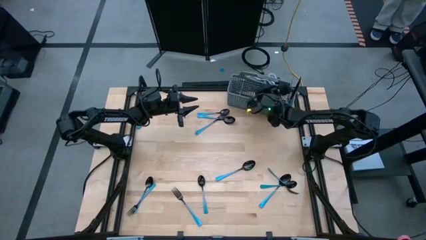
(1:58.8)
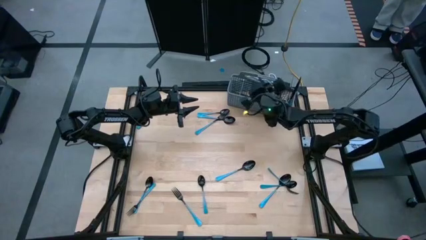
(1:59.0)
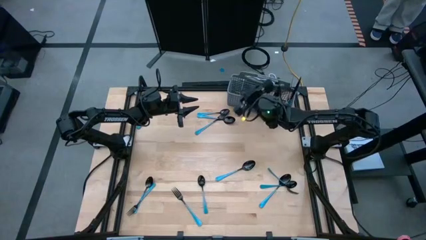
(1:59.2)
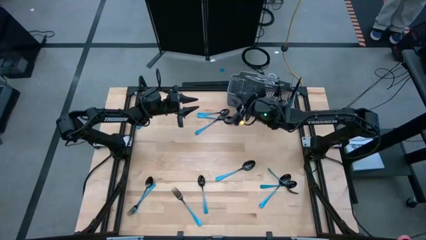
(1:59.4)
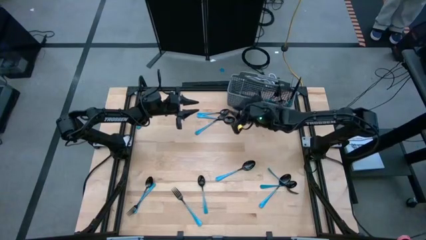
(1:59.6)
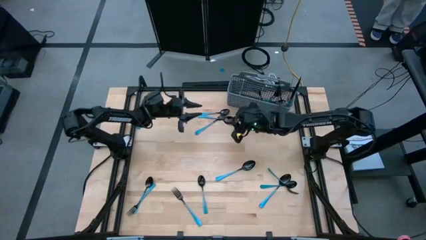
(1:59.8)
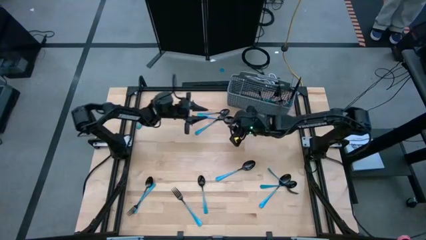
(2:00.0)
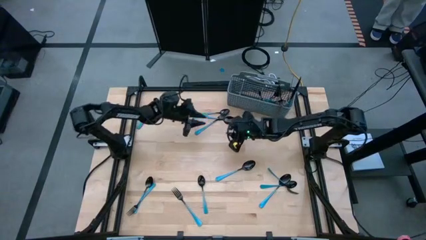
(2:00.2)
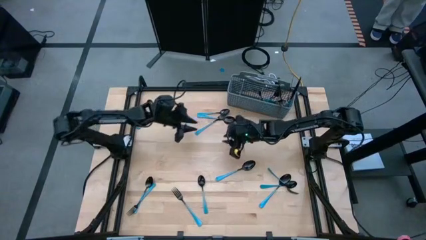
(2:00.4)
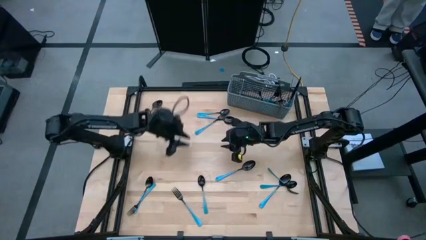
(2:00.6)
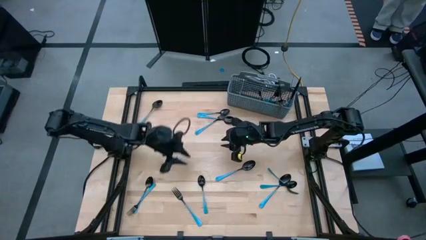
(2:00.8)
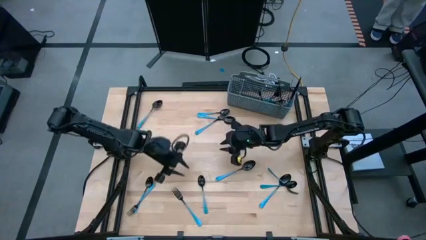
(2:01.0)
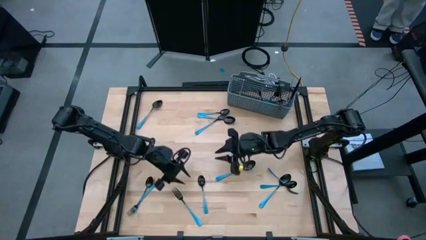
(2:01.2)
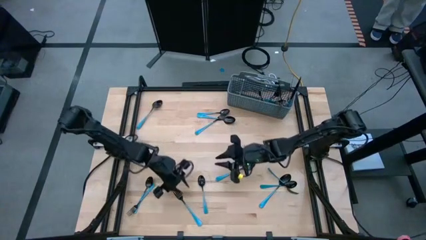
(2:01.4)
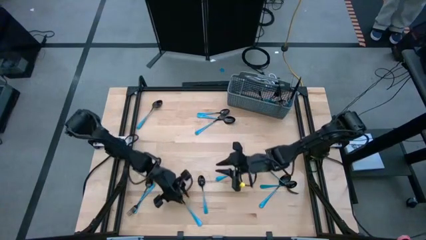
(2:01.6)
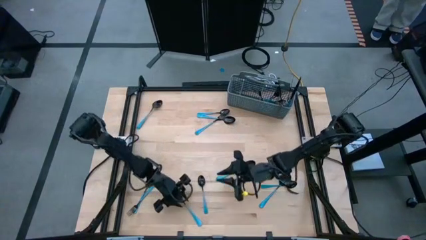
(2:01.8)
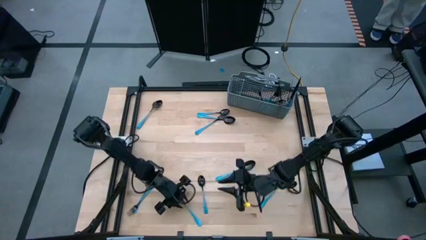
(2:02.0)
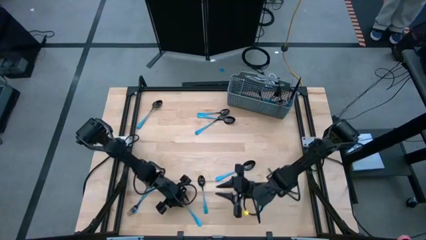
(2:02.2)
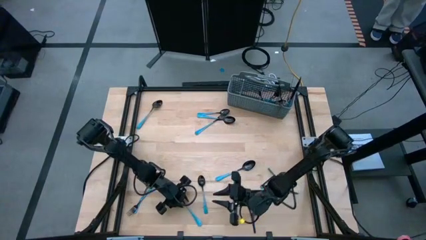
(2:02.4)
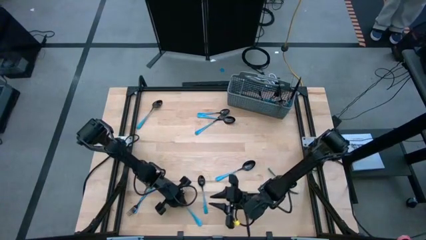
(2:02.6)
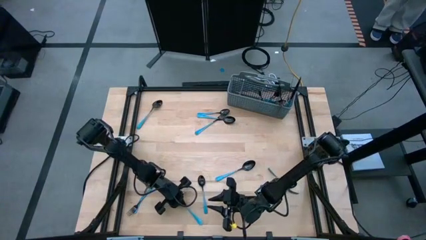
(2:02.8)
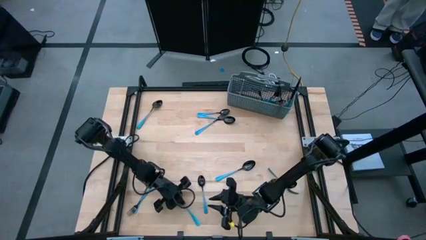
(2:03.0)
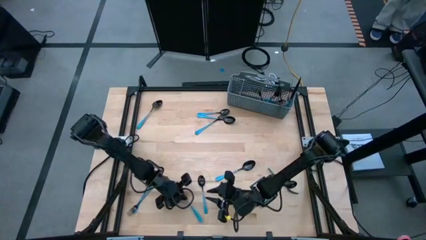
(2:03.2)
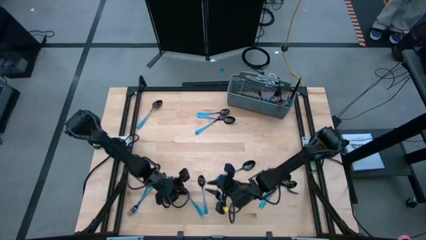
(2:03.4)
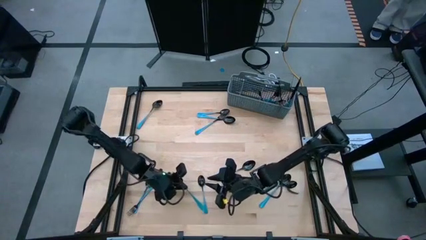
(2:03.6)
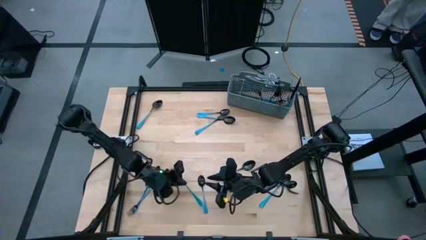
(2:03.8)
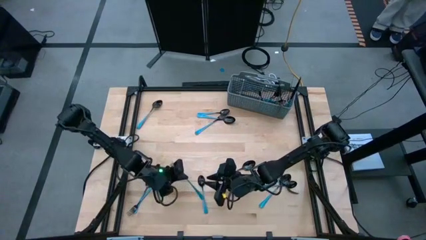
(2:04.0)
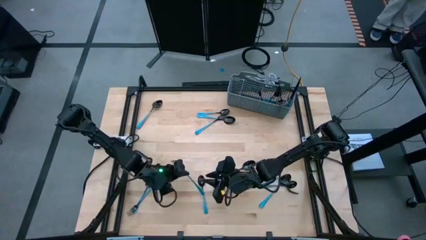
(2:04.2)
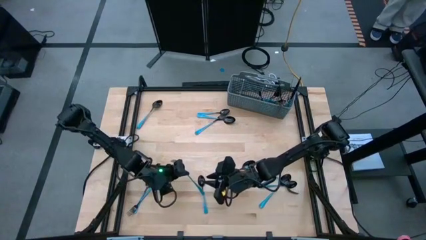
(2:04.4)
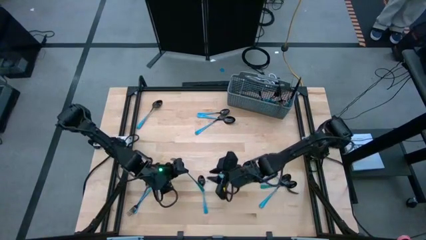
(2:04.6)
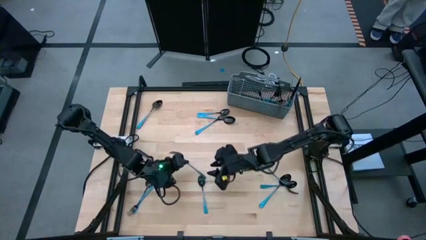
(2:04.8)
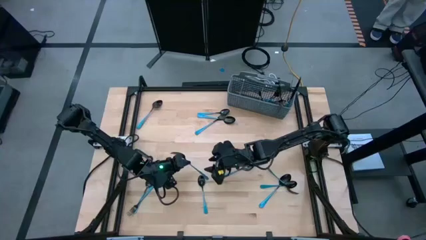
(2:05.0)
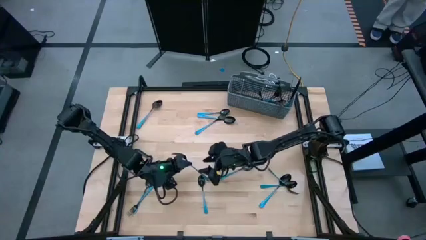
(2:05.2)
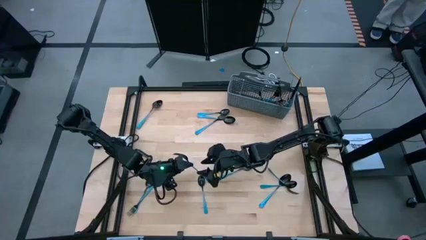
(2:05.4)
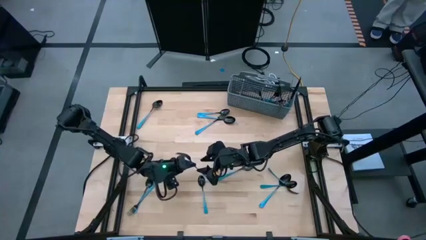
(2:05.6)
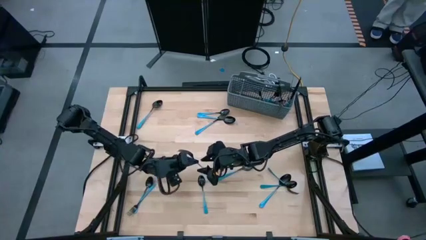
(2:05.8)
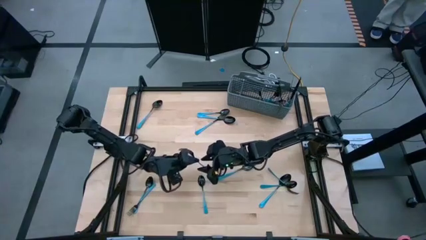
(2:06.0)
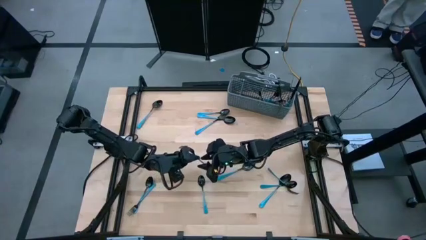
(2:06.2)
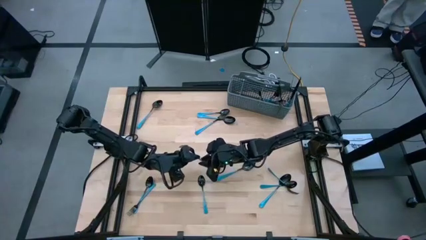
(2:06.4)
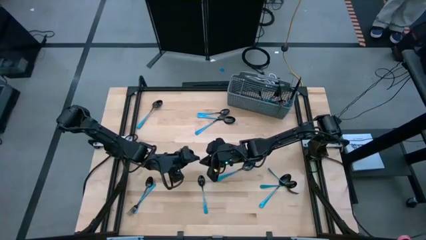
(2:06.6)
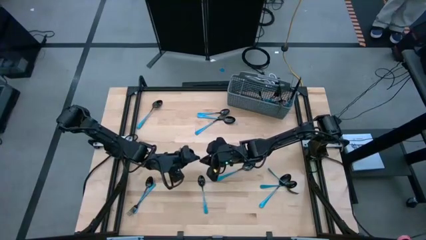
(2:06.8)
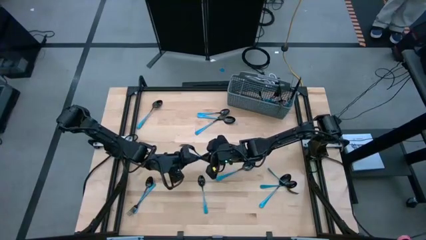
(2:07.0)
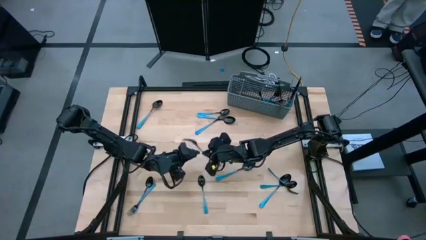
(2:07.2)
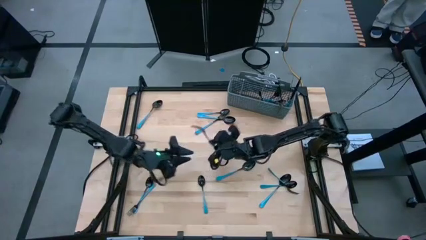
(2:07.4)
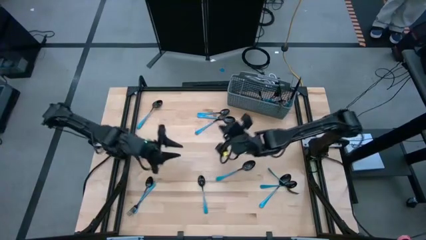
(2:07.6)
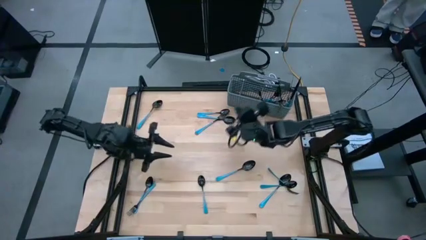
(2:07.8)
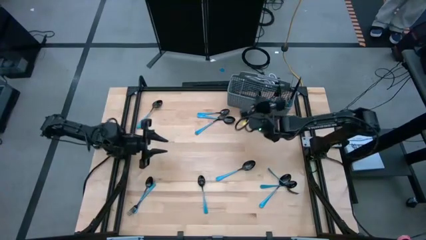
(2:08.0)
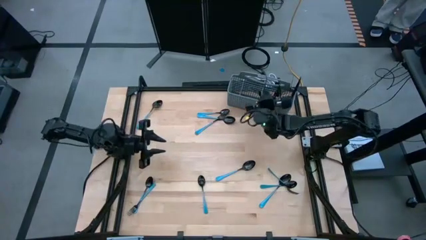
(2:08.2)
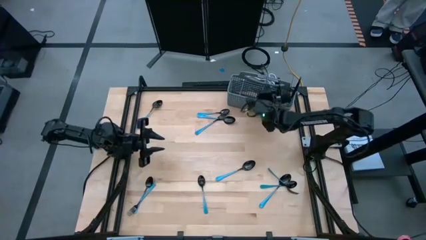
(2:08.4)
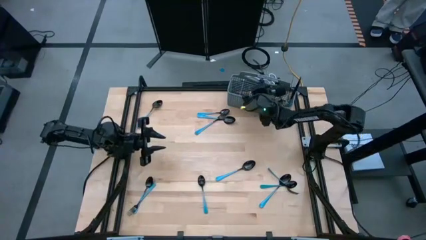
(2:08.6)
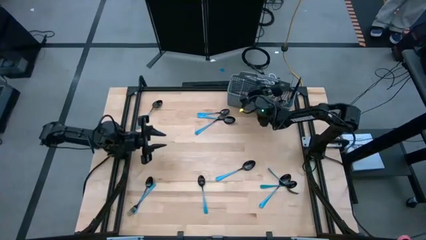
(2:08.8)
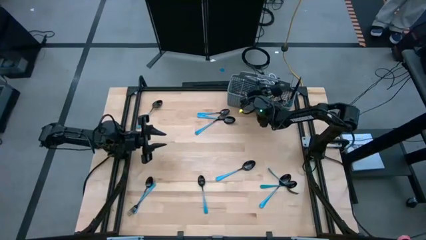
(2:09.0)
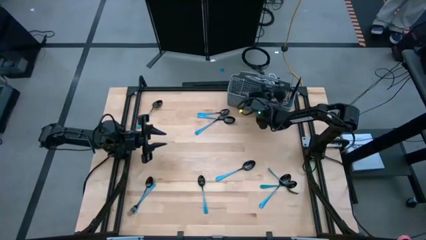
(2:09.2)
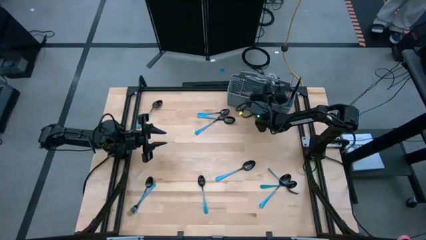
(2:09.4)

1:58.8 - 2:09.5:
Task: Sort silverware
Put the blue fork into the middle of the blue utensil organizer

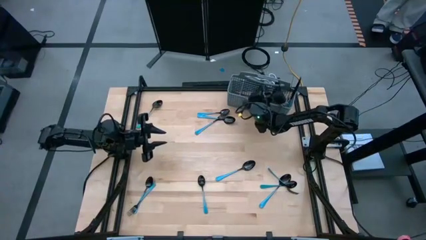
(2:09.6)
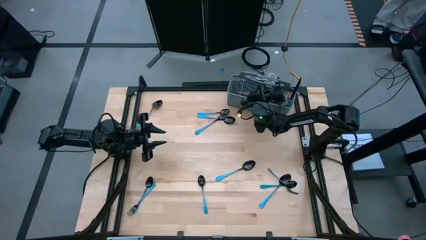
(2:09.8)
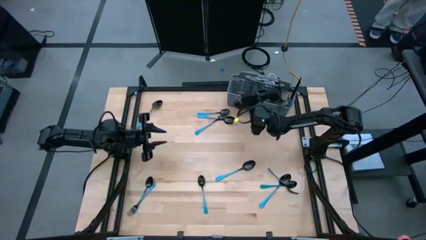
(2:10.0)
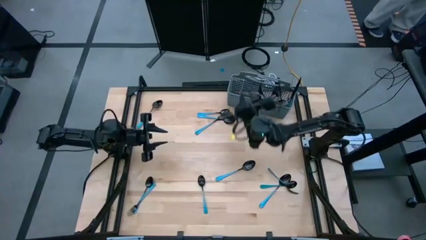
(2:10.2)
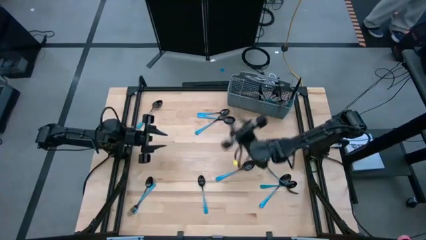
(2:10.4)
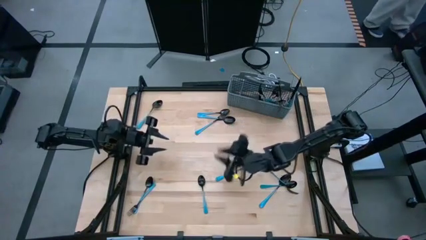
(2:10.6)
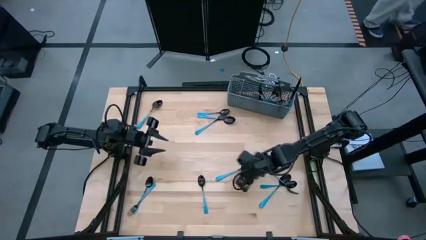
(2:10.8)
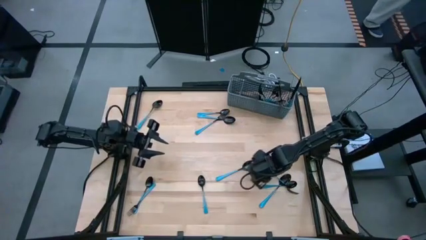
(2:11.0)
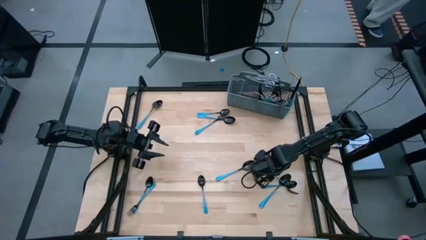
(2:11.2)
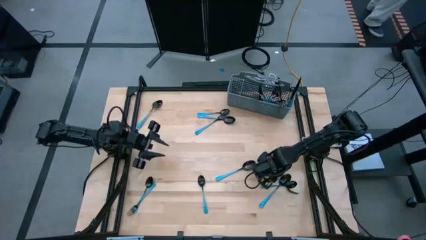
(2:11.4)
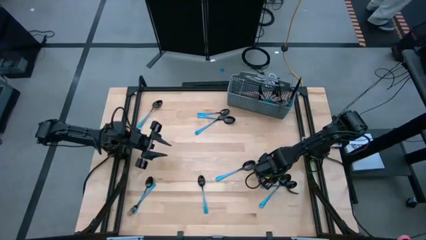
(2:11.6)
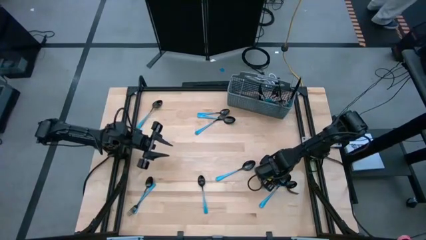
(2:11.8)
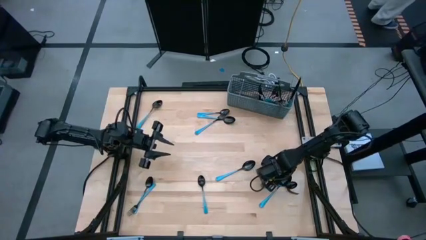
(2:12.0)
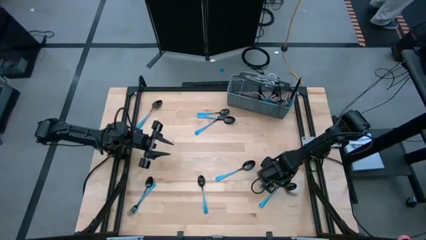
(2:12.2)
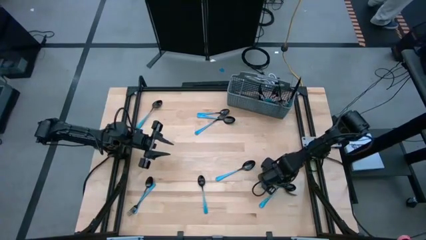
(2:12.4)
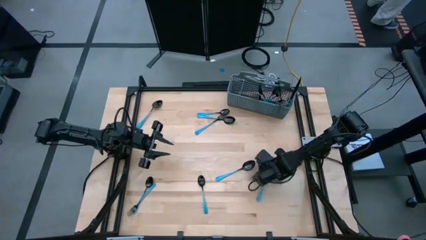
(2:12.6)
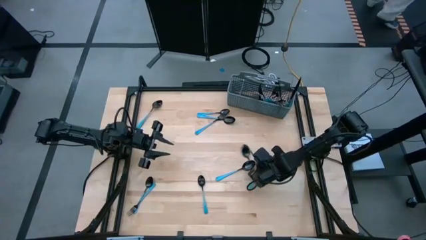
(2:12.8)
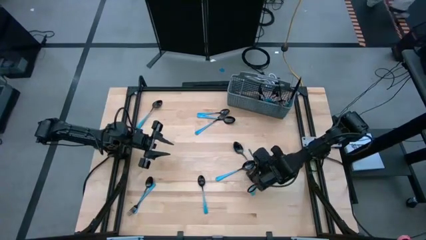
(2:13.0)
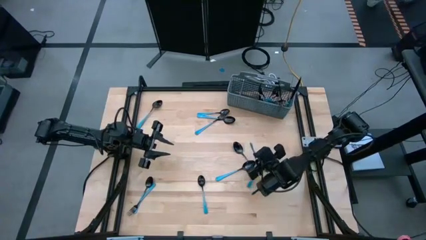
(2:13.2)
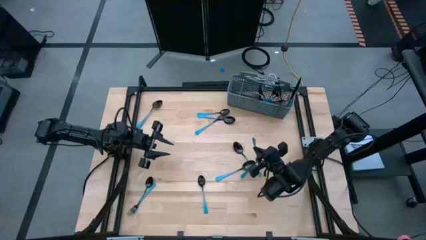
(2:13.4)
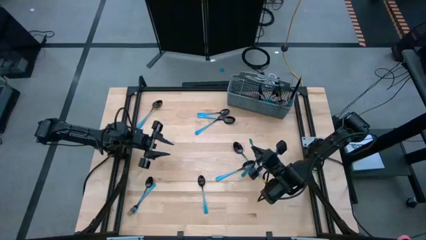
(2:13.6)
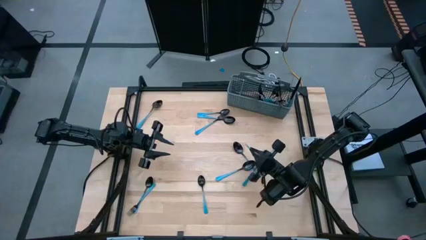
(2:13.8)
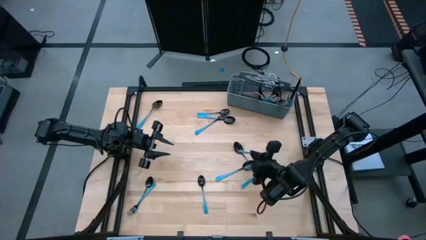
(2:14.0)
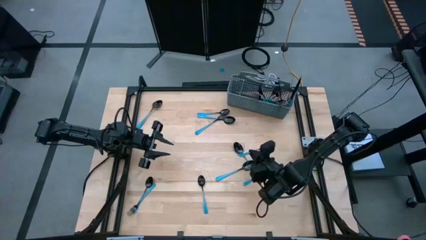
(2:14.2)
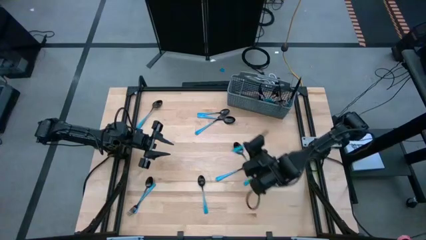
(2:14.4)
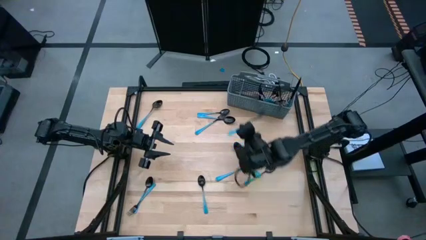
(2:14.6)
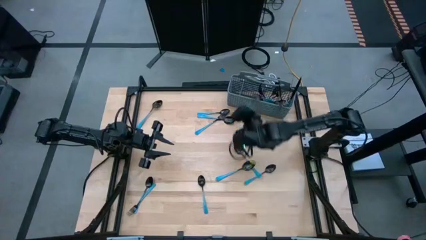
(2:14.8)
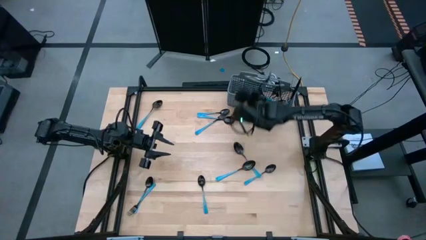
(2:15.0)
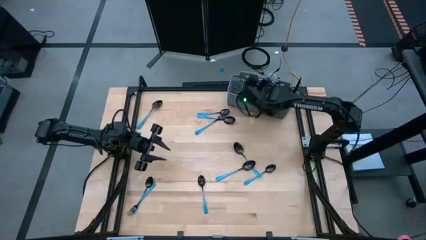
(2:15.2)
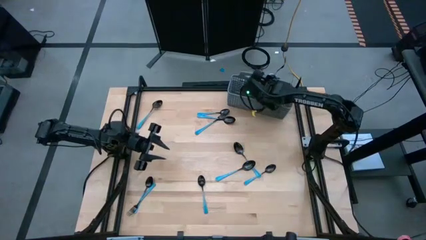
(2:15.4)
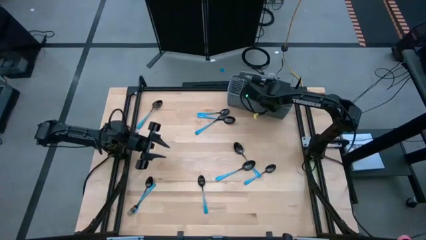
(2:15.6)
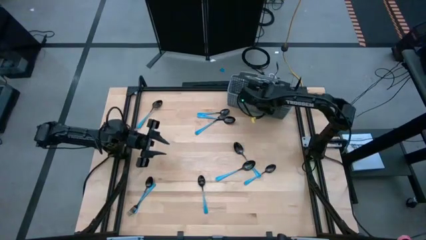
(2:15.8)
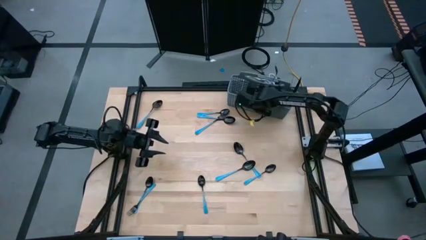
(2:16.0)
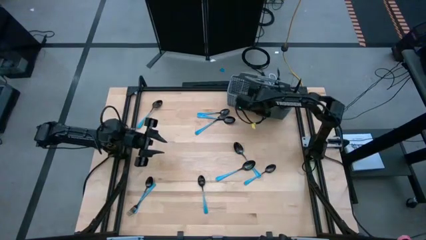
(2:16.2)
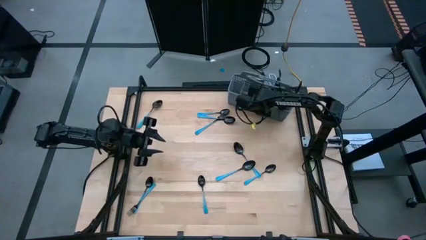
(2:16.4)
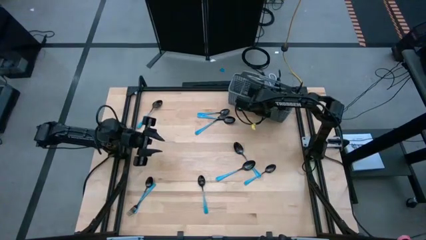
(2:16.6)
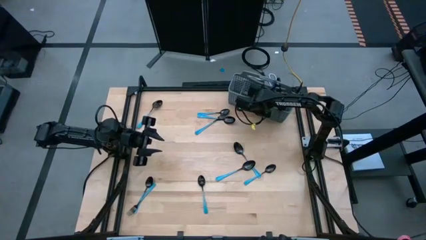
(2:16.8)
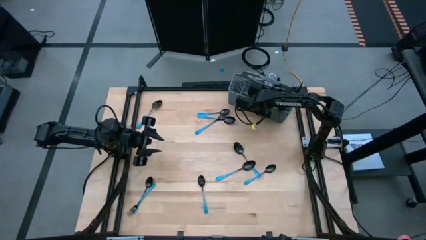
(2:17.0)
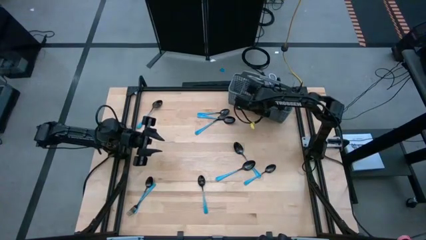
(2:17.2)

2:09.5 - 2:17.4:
Put the blue fork into the middle of the blue utensil organizer
